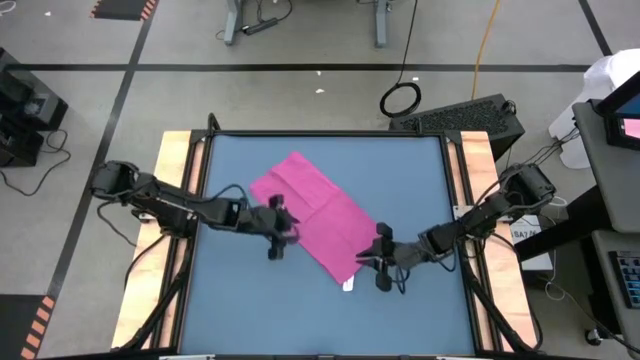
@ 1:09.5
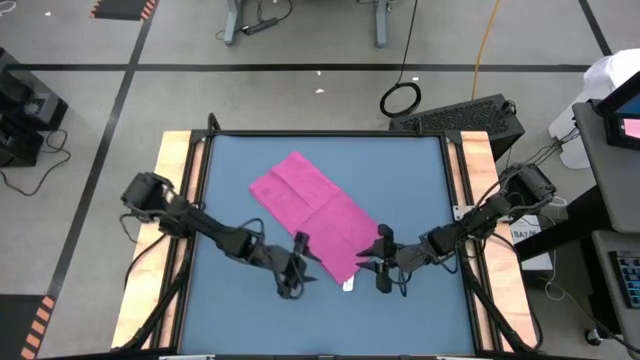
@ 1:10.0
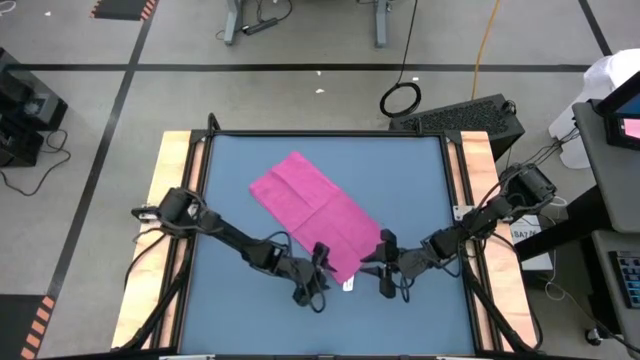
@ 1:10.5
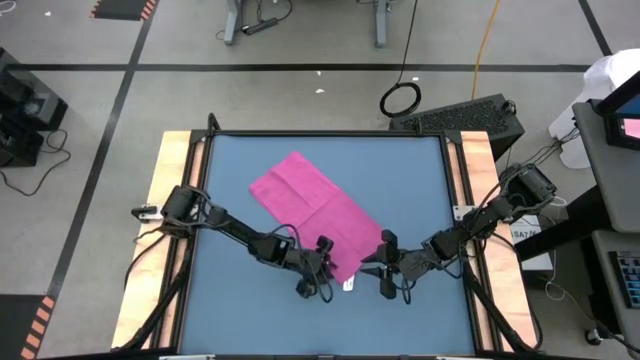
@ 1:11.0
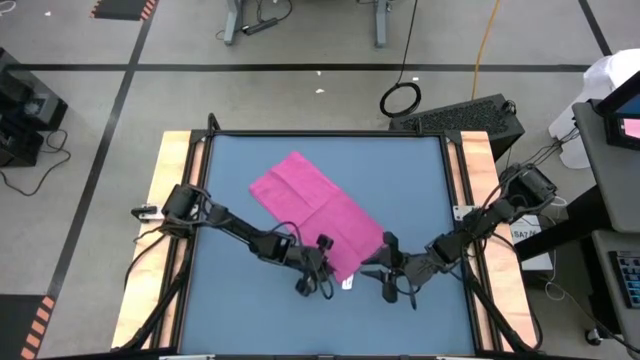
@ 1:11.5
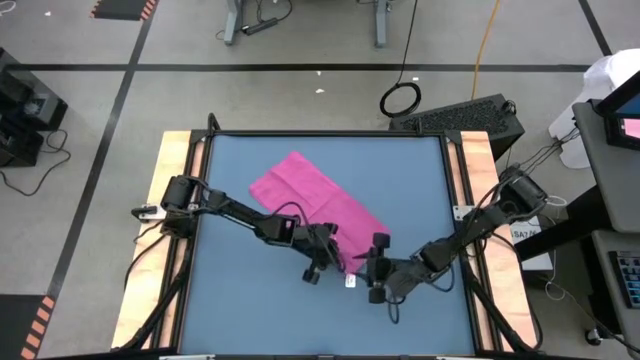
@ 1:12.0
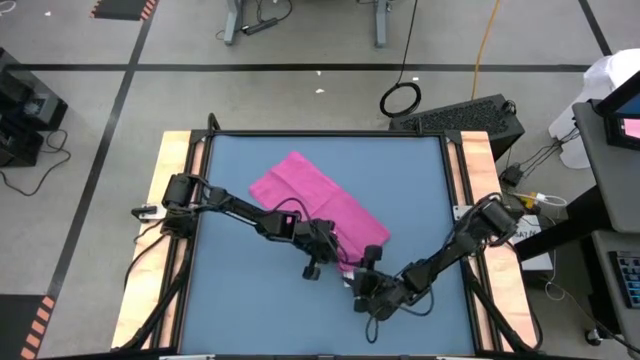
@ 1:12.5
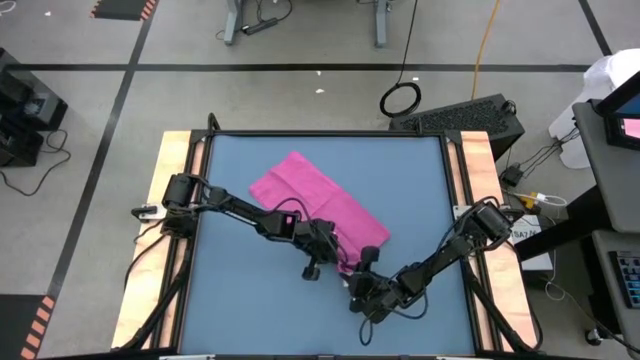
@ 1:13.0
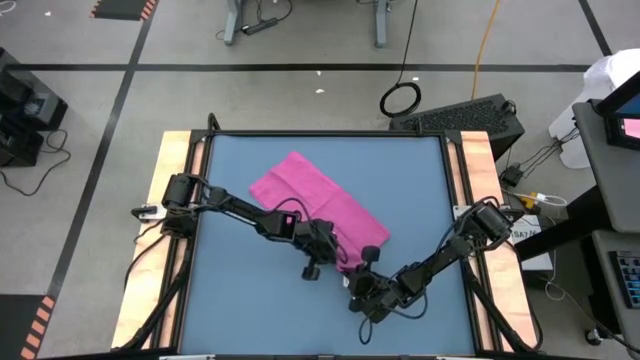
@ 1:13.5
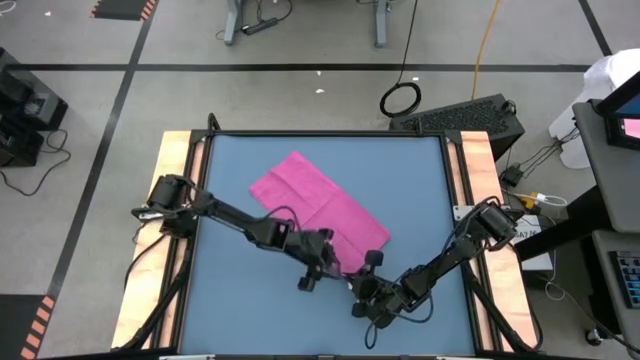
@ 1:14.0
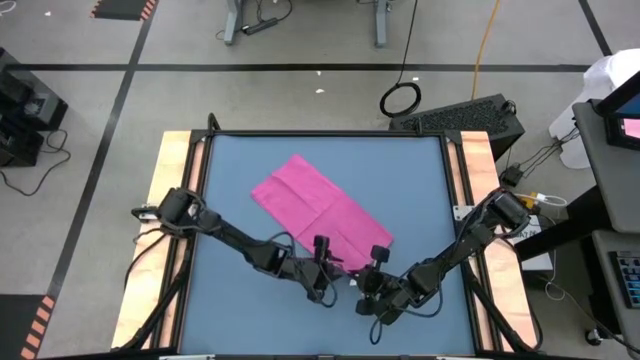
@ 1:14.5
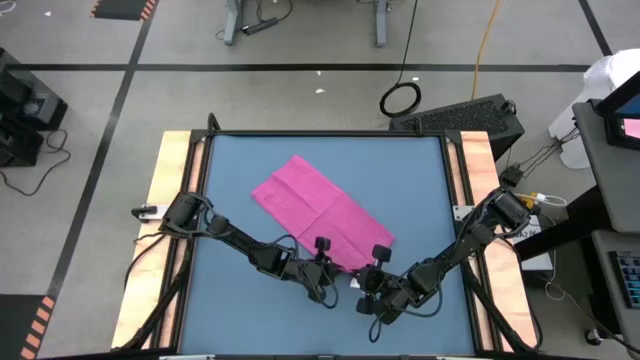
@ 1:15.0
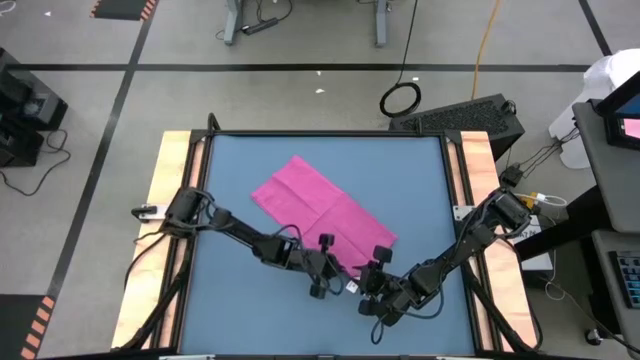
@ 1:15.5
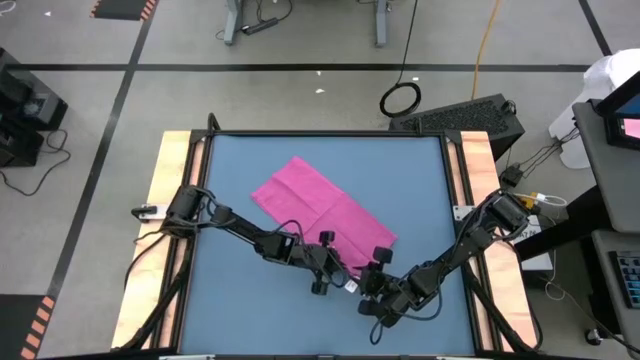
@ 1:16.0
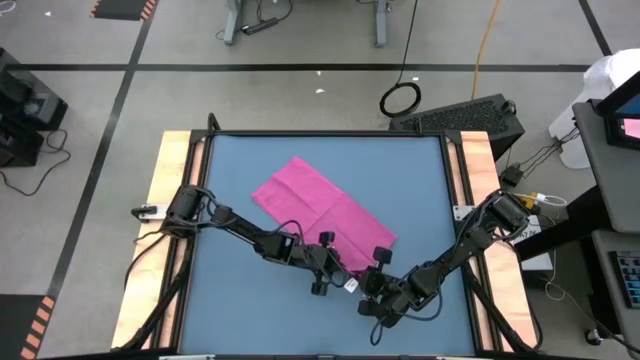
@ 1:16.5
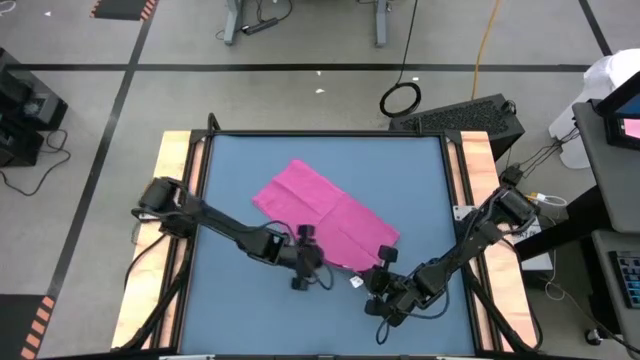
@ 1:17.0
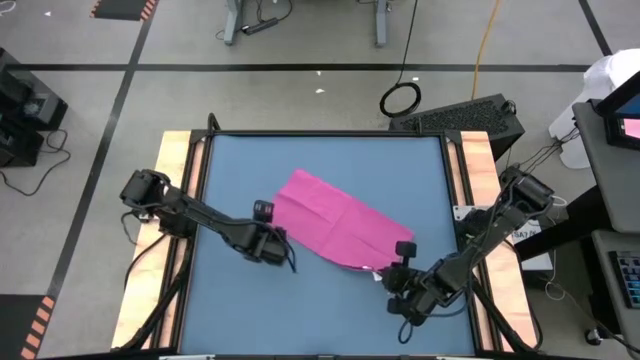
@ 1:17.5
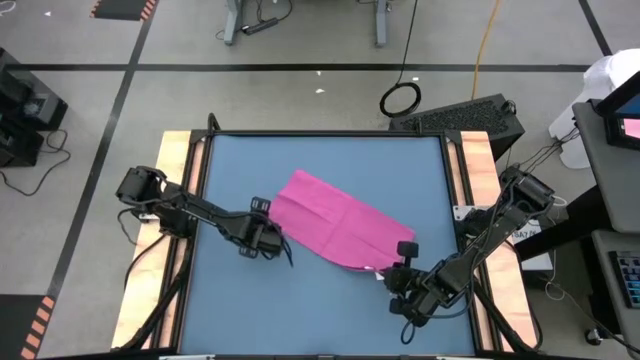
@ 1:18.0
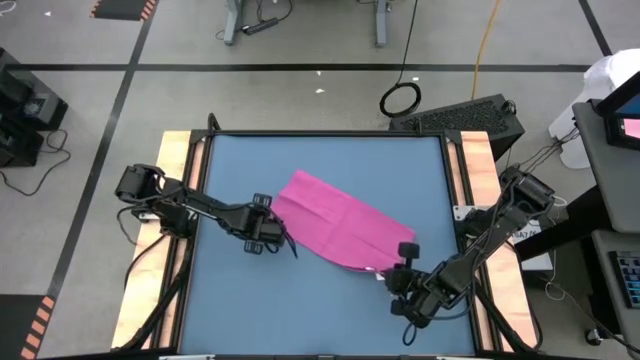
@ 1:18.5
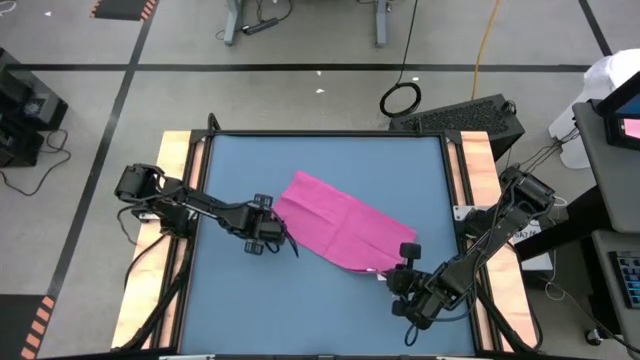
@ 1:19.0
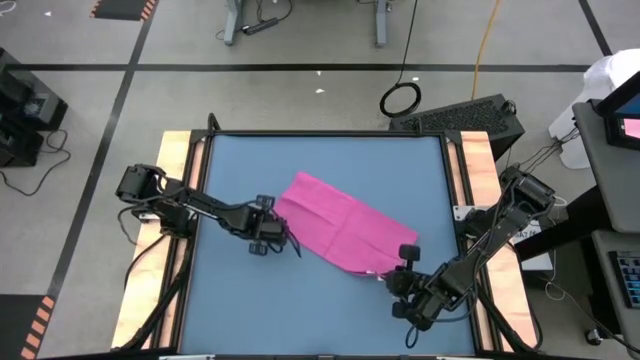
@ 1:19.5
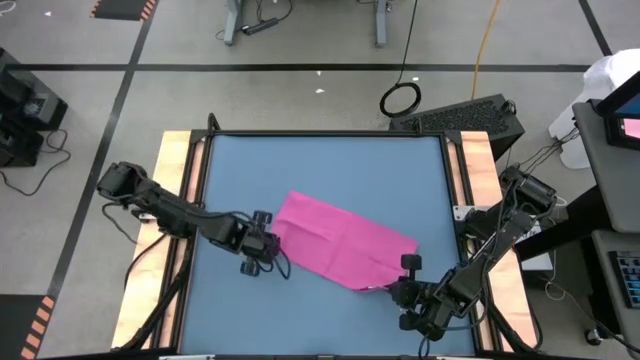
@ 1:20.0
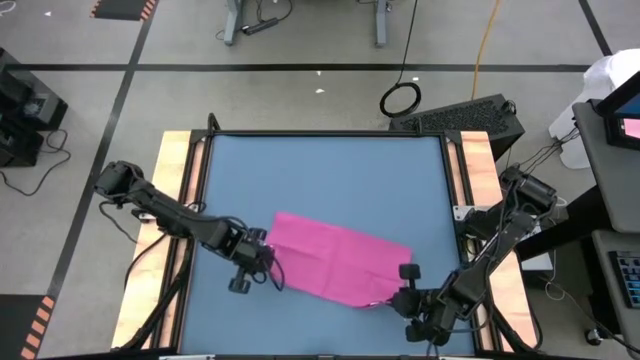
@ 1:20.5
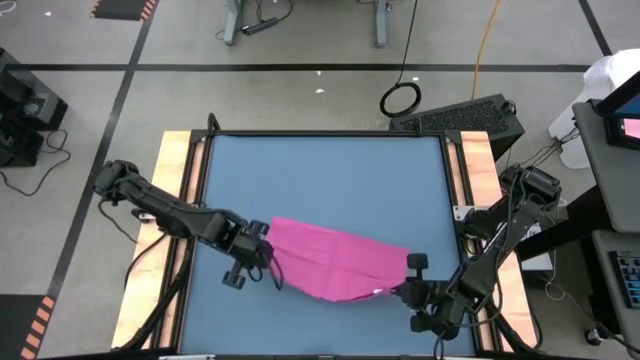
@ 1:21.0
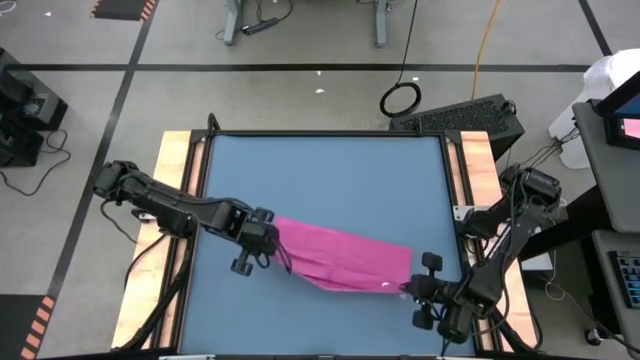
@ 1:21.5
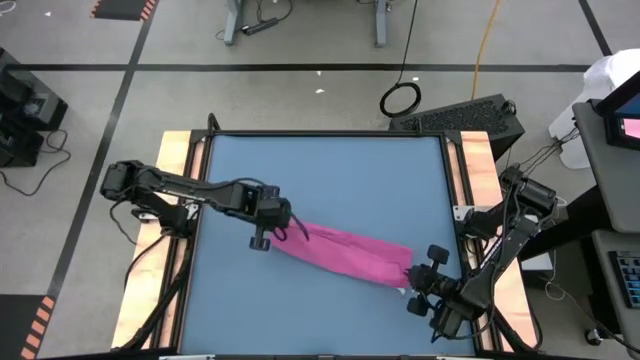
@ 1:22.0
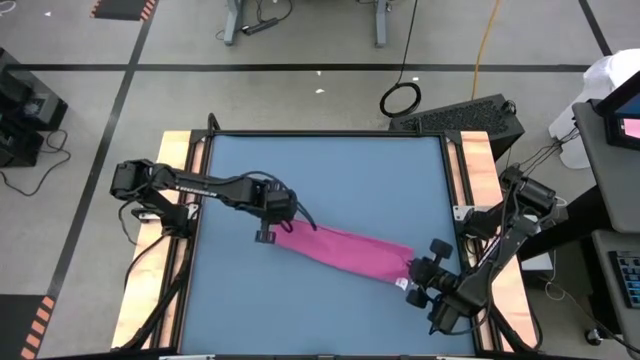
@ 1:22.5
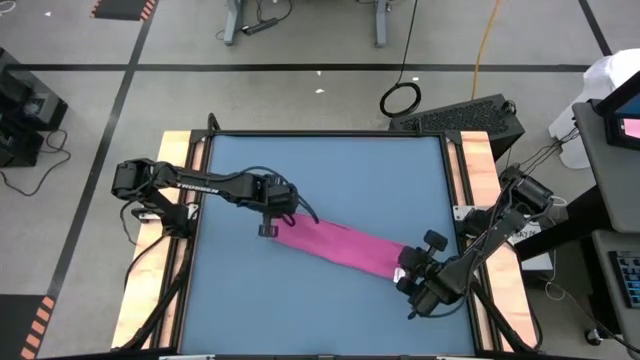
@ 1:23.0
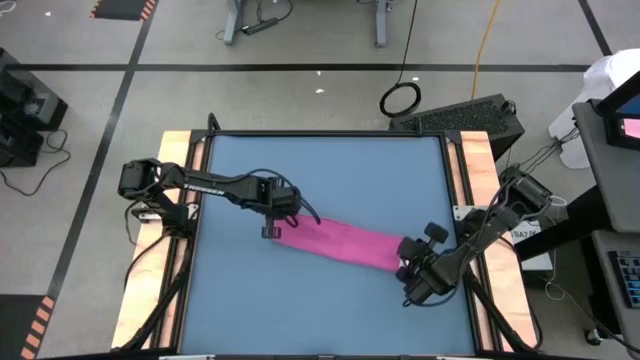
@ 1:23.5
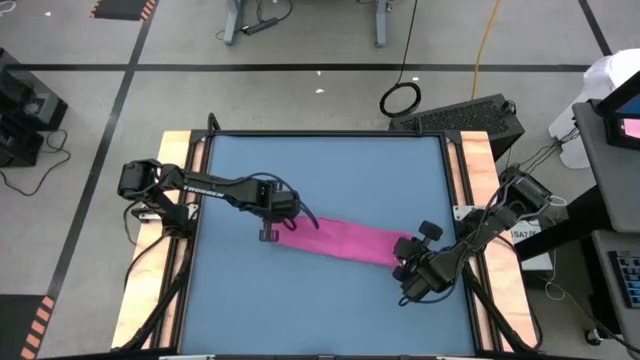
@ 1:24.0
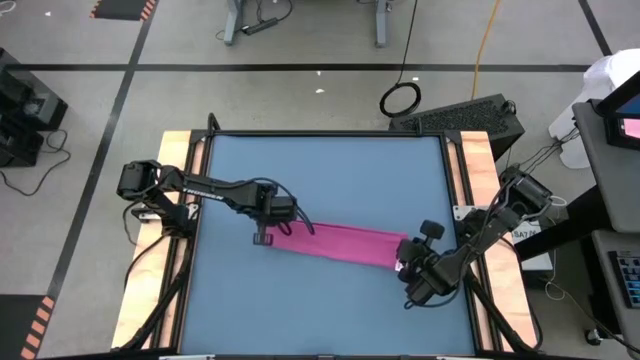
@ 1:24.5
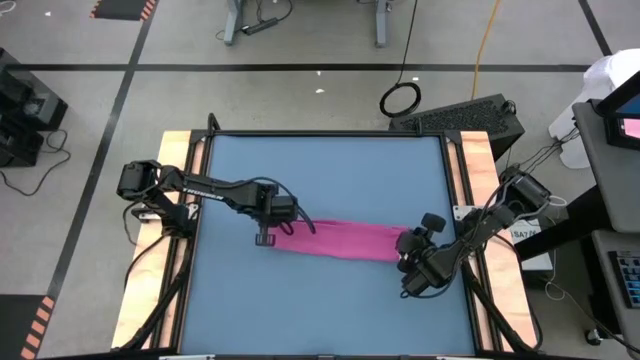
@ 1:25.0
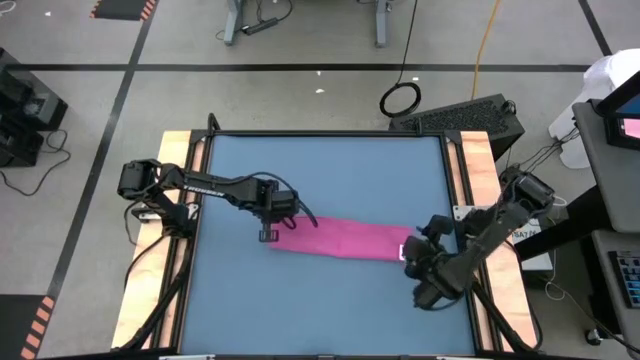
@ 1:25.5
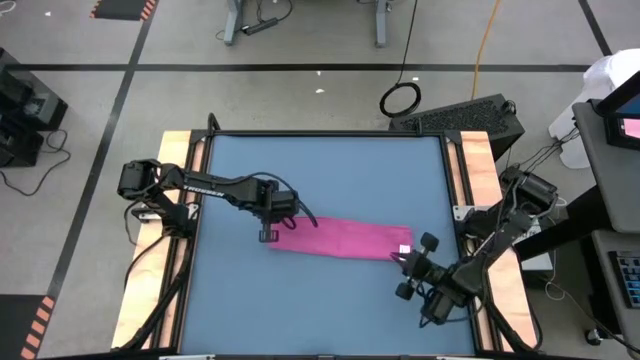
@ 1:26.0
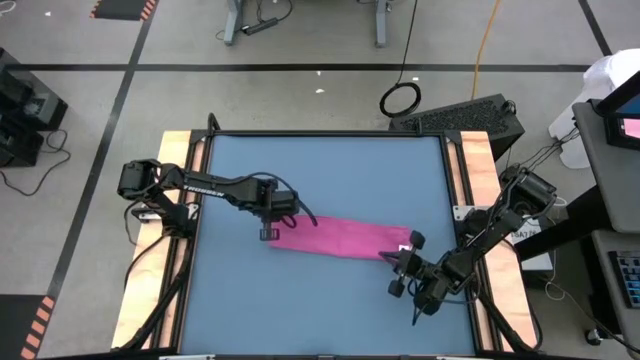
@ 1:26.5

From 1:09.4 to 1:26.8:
Task: Roll towel into tight, uniform cylinder
Fold the pink towel

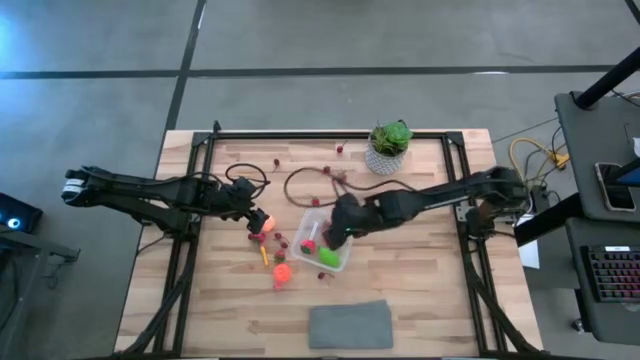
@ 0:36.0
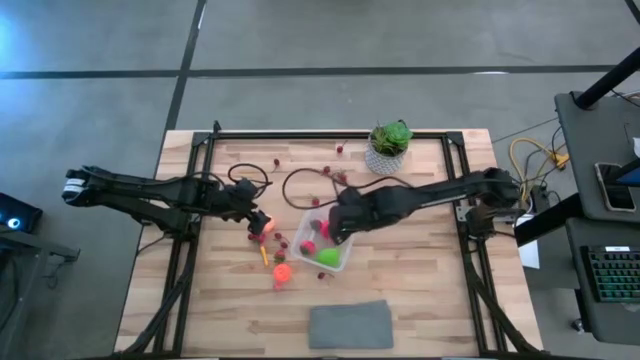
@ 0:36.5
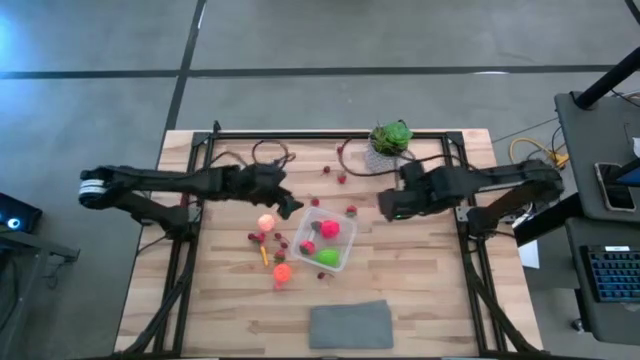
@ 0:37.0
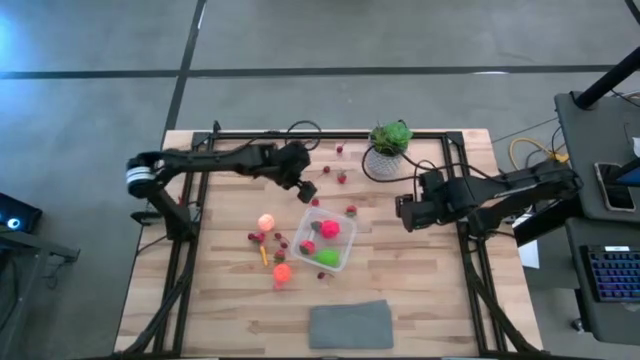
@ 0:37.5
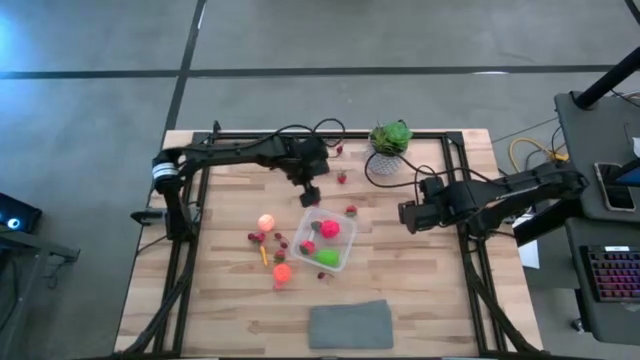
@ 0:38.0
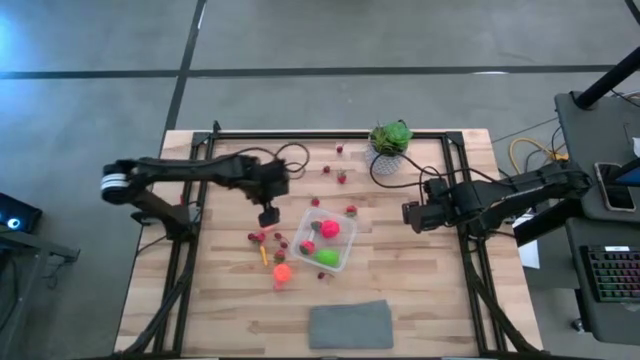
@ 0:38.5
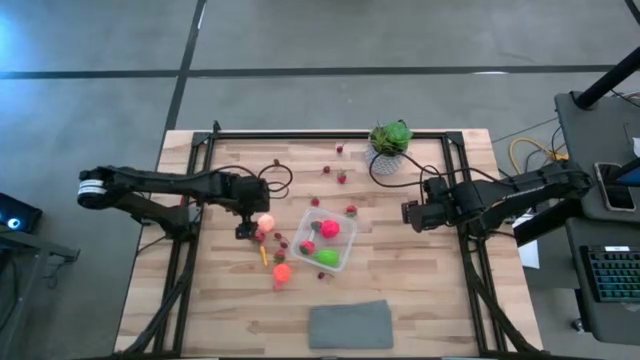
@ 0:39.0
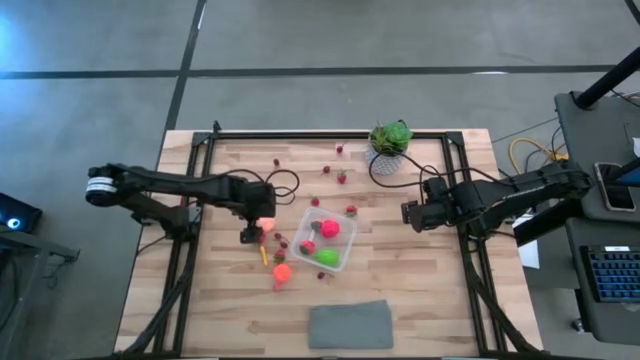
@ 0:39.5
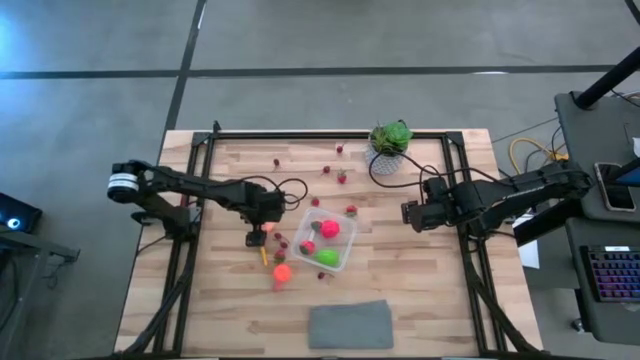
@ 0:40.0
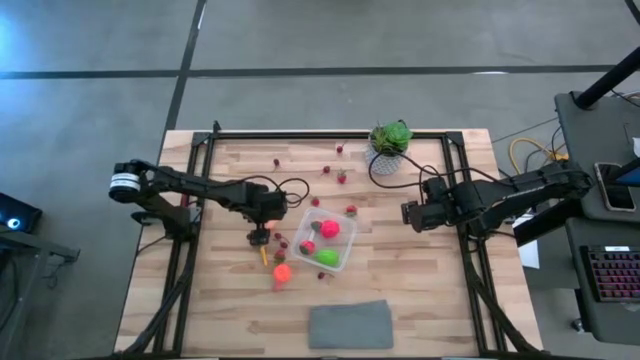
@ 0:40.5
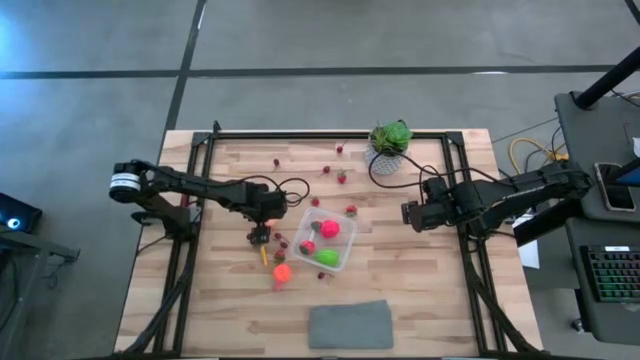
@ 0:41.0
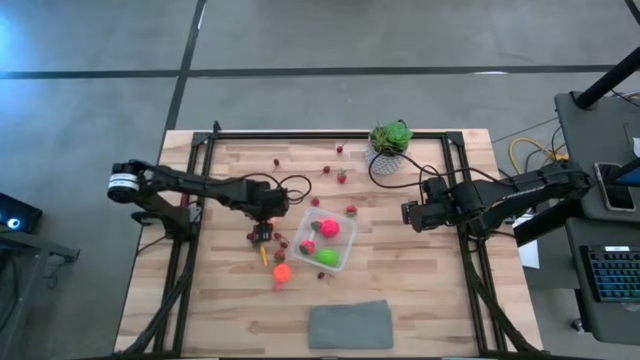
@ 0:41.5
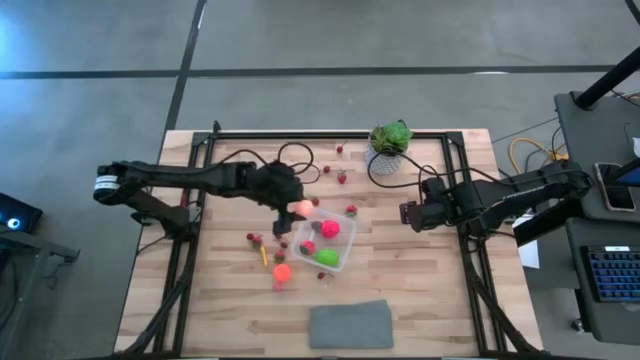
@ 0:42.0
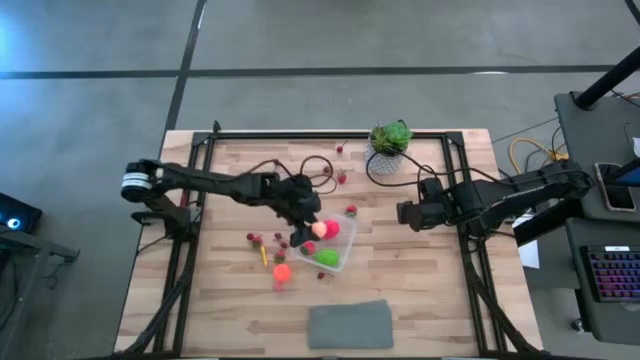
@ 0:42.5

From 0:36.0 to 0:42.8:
Task: Pick and placing Produce into tupperware
Put the peach into the transparent container
